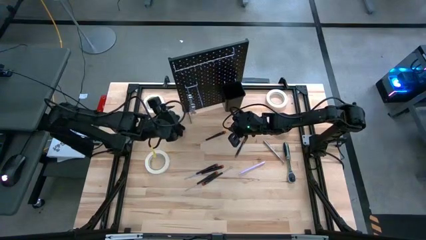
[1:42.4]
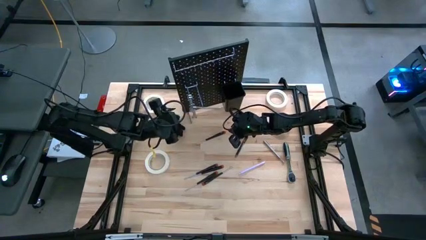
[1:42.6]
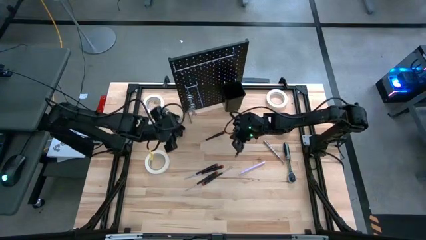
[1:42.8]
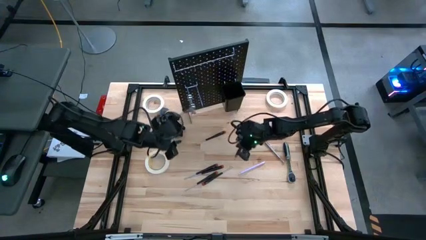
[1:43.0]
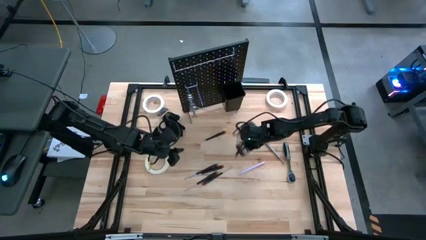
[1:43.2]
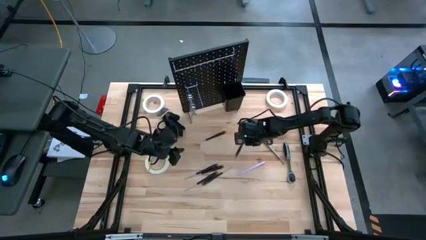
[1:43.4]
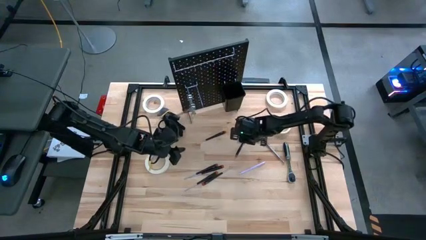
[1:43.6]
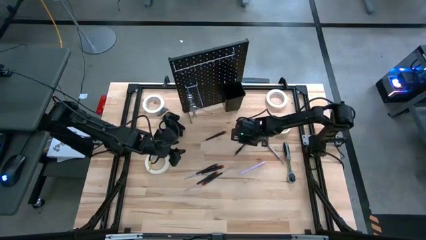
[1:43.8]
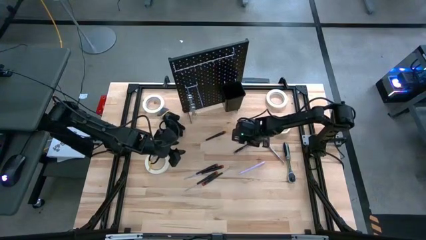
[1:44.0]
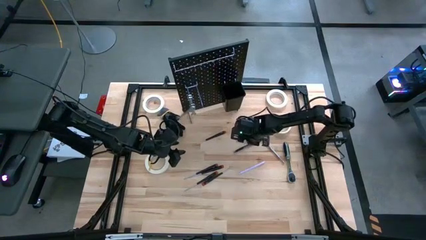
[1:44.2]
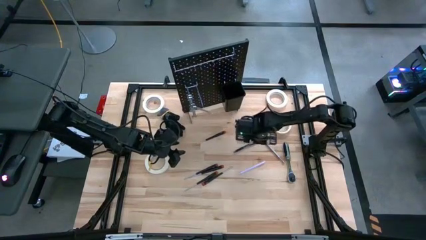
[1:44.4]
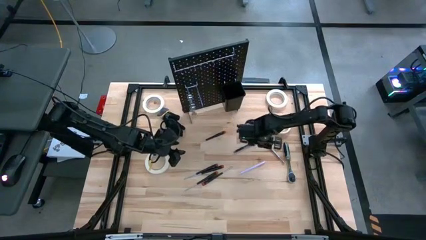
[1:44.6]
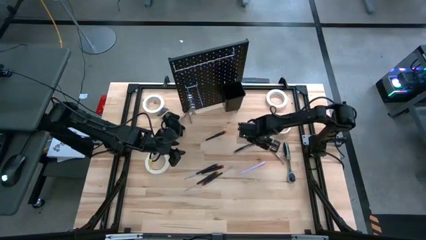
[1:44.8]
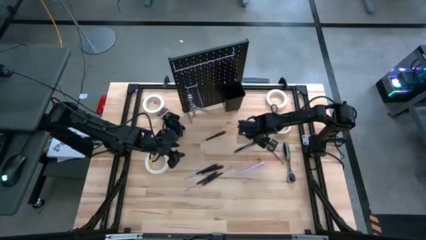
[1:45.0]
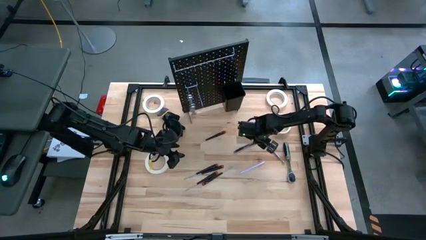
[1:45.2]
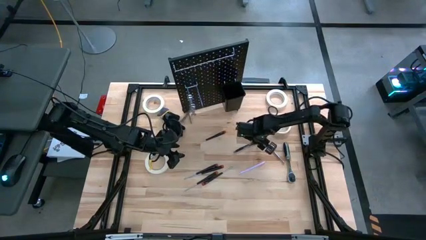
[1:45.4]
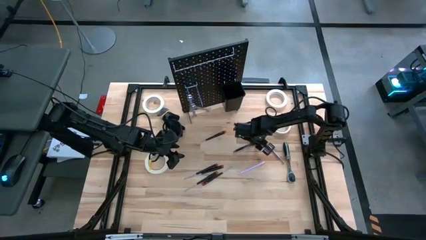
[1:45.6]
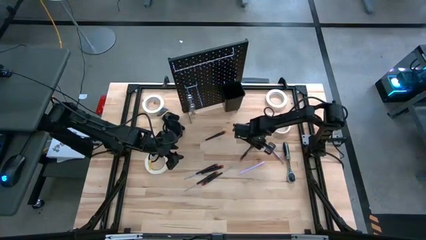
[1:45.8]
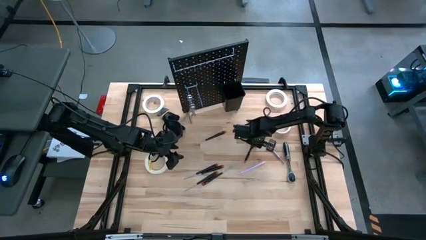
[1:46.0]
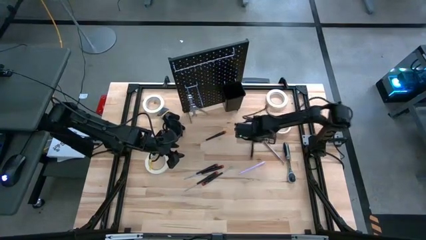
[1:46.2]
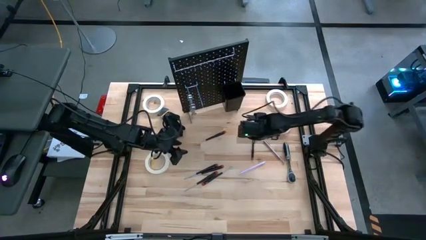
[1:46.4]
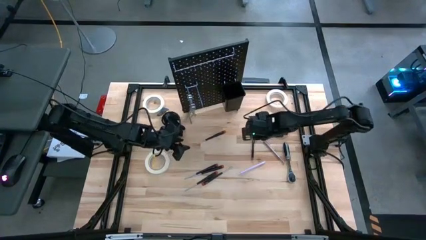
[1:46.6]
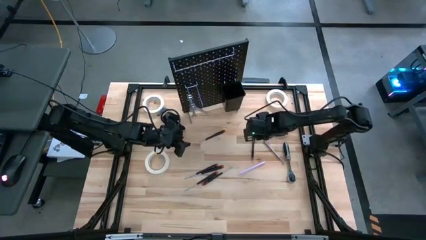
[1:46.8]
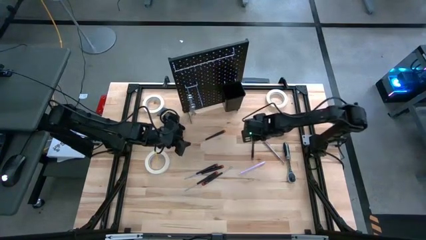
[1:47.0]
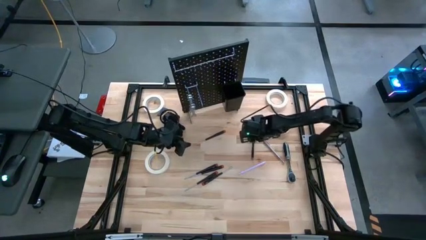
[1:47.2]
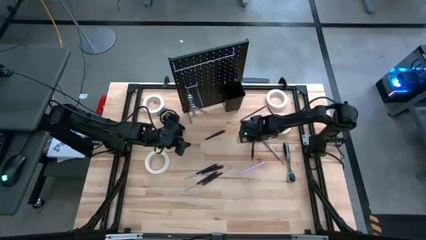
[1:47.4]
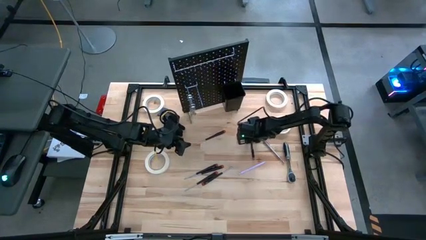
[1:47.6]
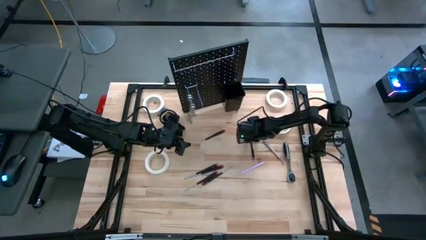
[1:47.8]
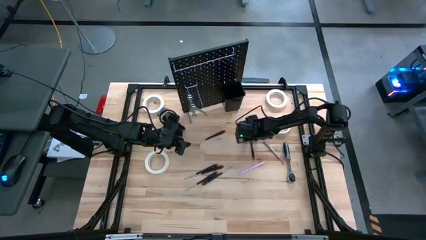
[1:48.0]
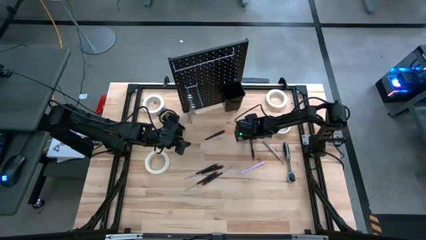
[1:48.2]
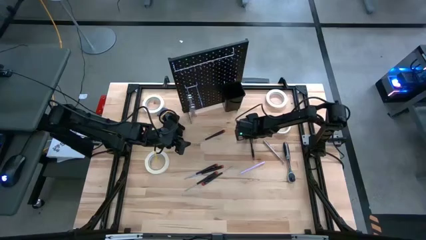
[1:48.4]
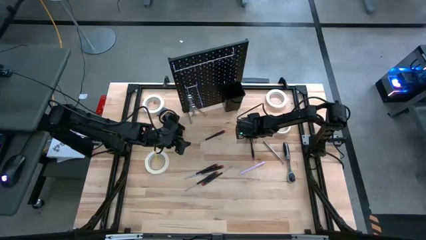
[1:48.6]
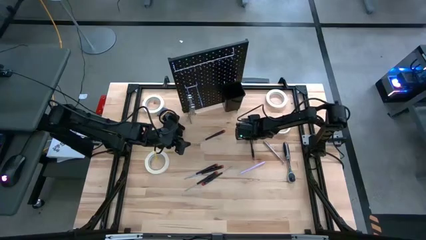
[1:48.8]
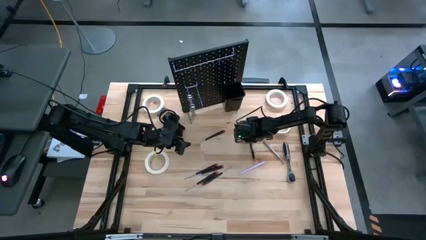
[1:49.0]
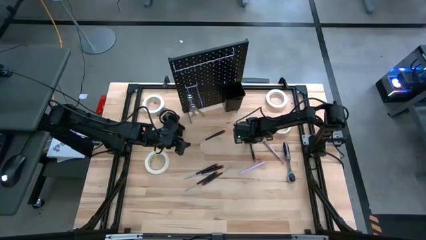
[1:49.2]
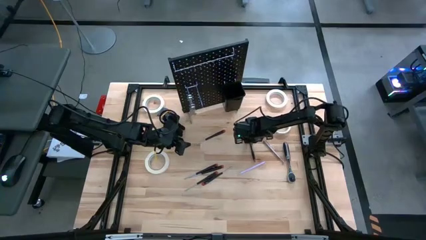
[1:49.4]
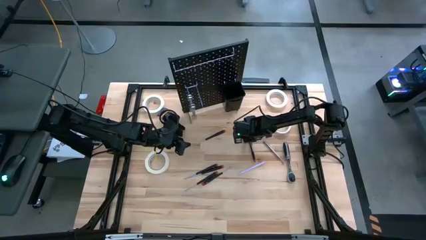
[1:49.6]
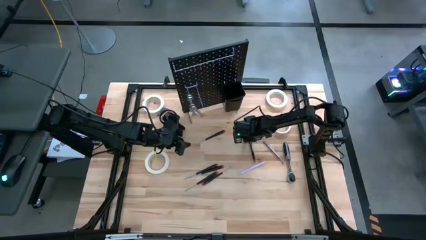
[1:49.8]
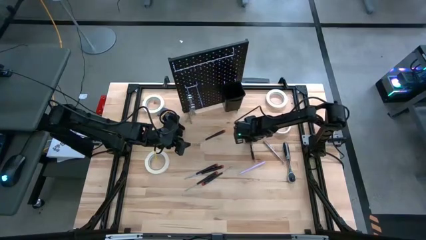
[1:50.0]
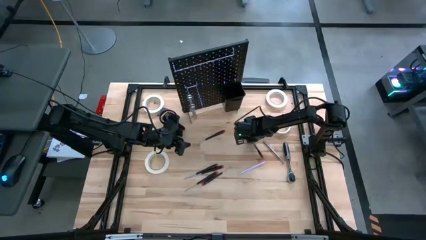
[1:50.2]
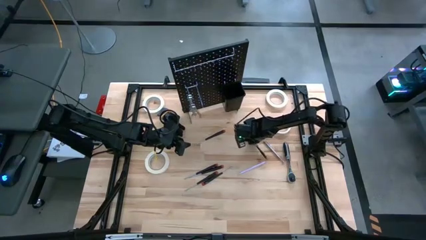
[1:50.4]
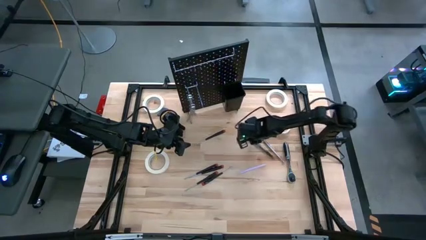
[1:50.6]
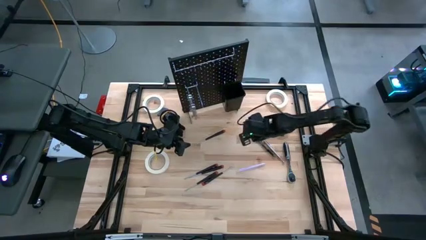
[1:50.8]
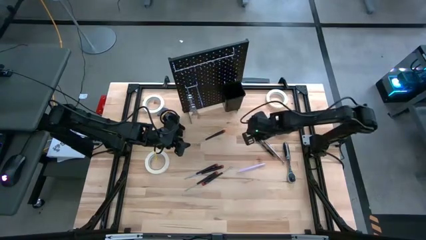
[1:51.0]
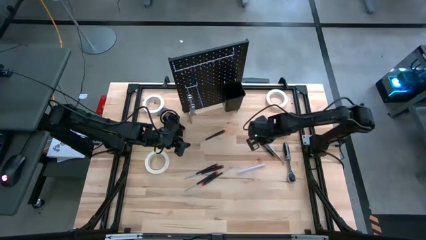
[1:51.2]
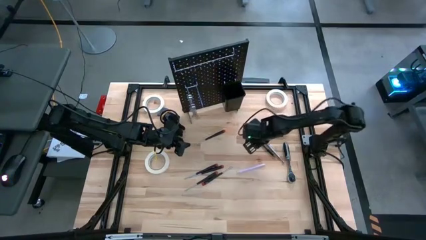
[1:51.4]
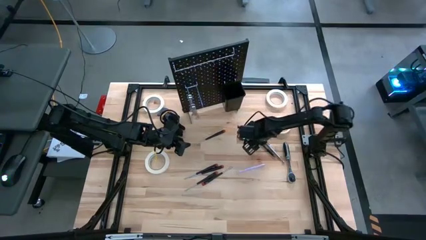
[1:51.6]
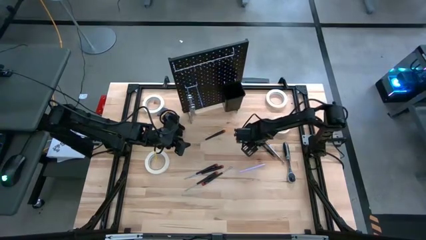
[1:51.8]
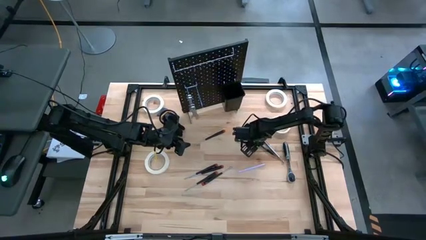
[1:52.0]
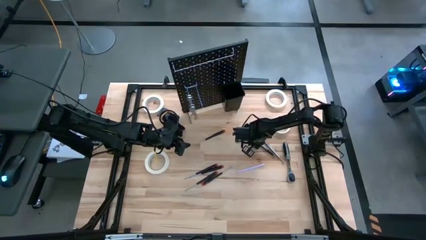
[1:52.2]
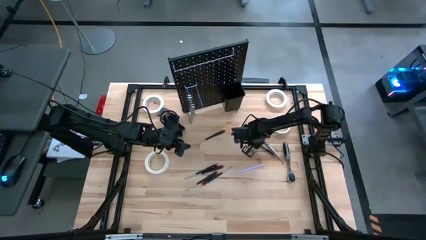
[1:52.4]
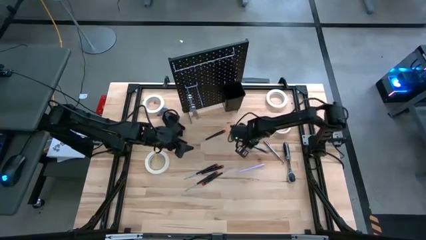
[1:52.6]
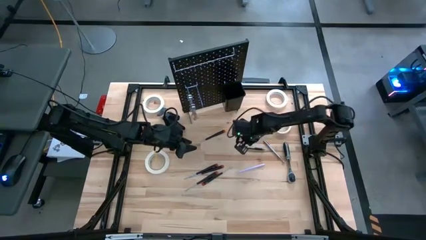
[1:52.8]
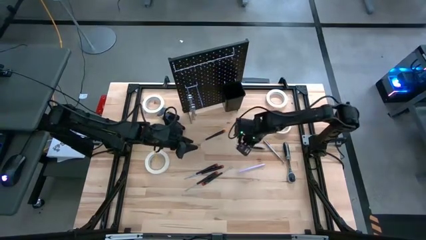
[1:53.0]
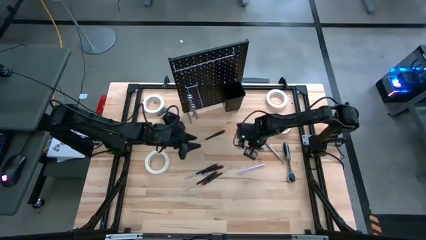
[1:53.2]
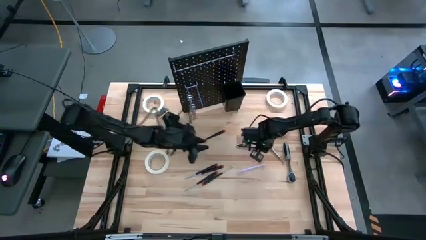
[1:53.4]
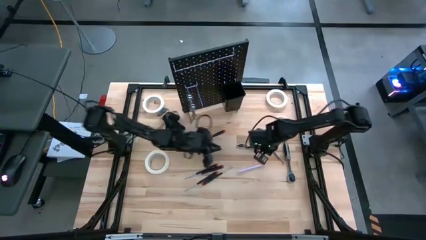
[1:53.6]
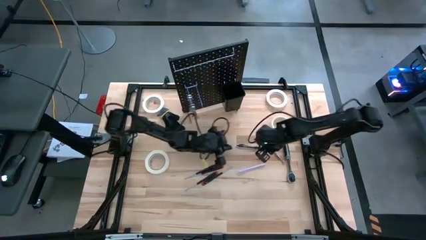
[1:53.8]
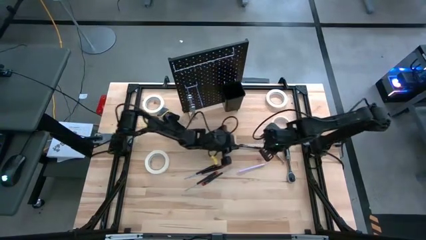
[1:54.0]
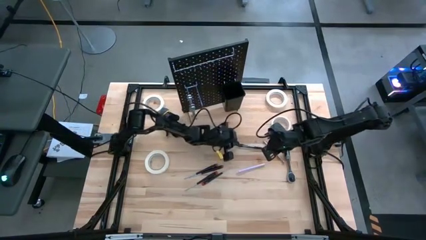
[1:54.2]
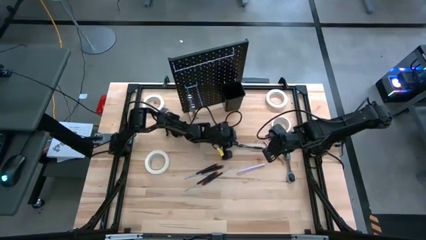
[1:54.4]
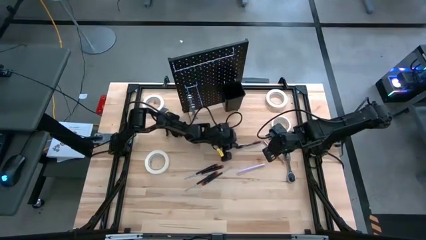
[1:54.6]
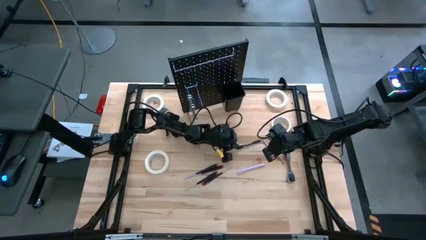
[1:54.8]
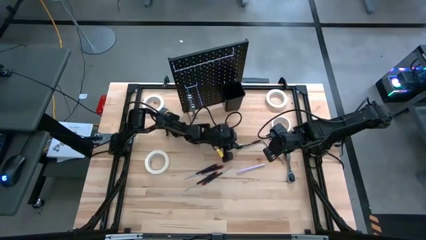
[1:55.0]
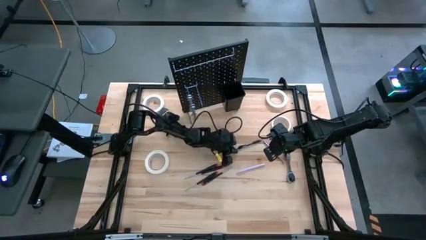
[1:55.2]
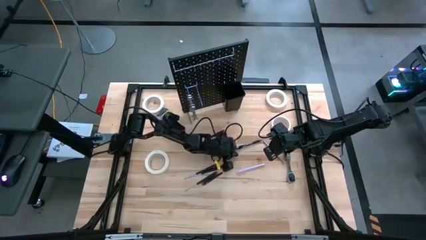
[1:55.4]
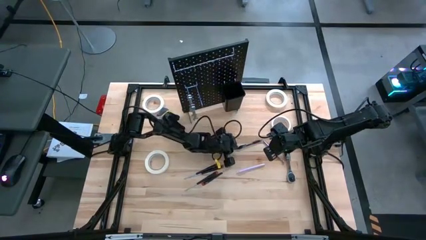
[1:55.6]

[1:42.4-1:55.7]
Task: Hang tools onto peg board
Put the black pen into the black bin on the peg board
